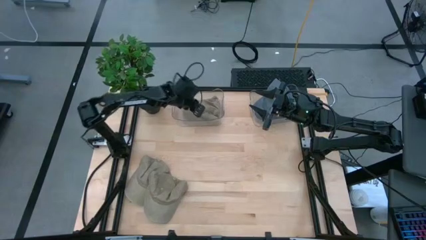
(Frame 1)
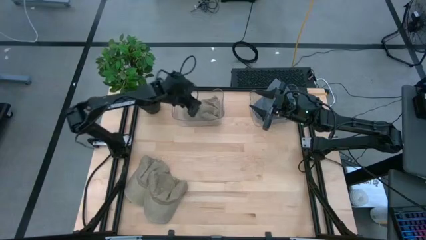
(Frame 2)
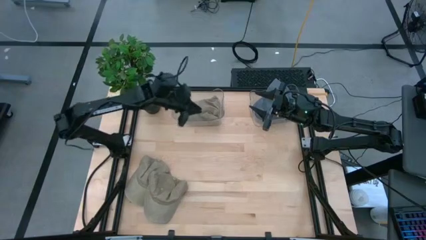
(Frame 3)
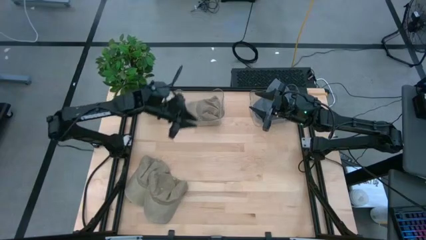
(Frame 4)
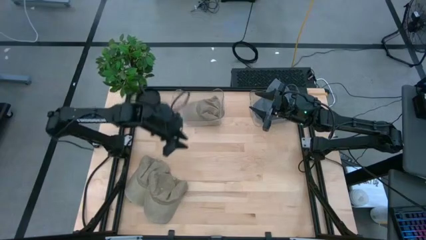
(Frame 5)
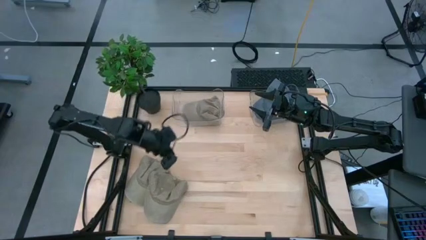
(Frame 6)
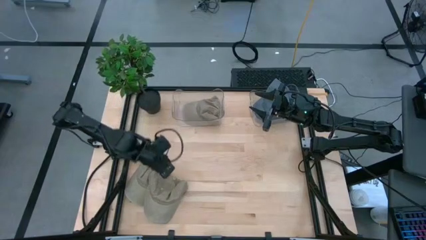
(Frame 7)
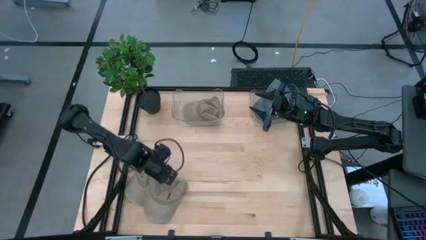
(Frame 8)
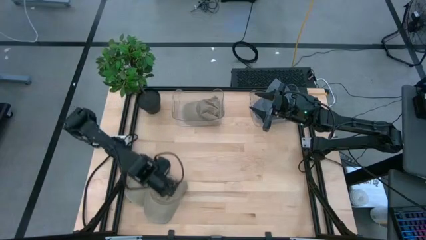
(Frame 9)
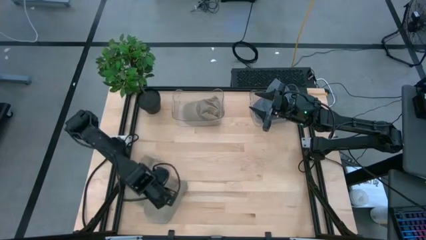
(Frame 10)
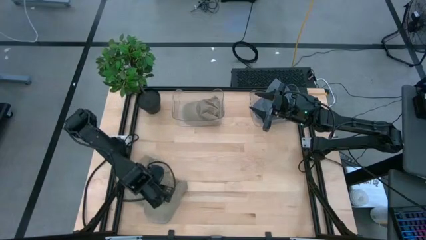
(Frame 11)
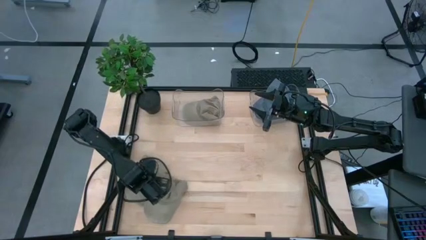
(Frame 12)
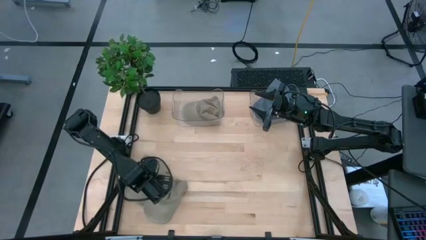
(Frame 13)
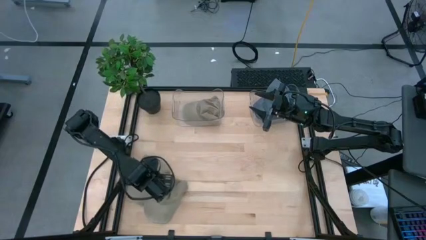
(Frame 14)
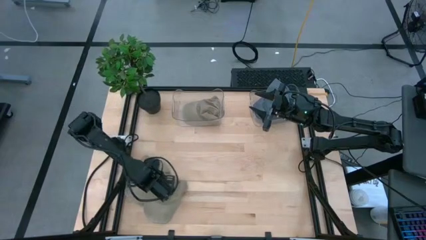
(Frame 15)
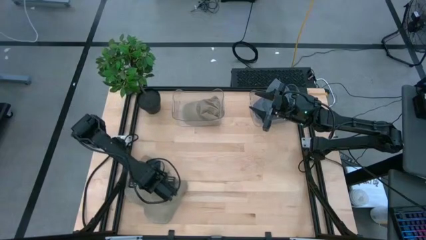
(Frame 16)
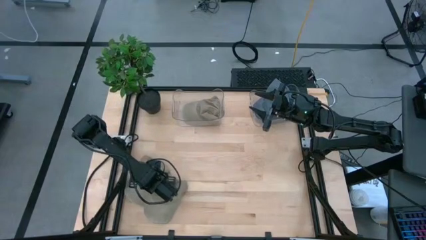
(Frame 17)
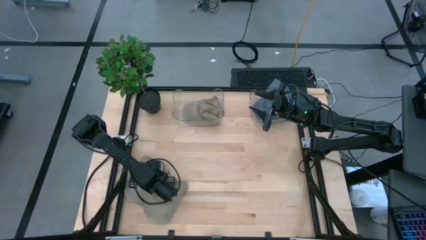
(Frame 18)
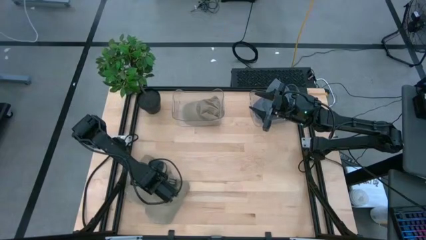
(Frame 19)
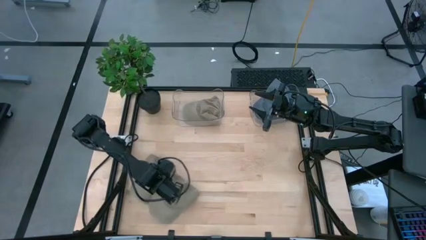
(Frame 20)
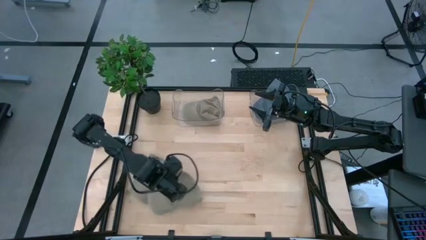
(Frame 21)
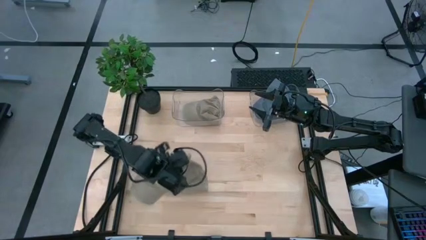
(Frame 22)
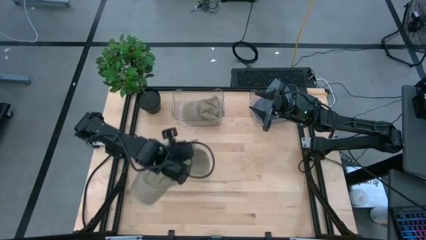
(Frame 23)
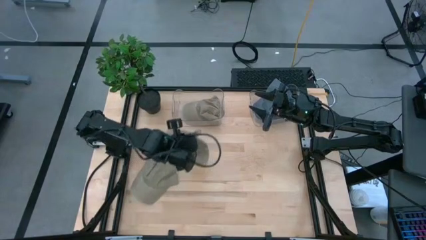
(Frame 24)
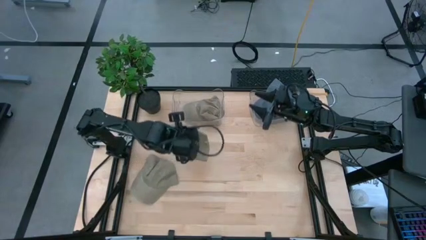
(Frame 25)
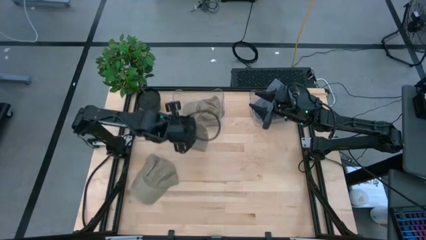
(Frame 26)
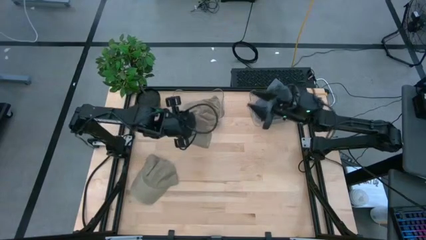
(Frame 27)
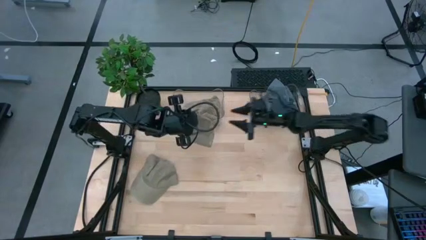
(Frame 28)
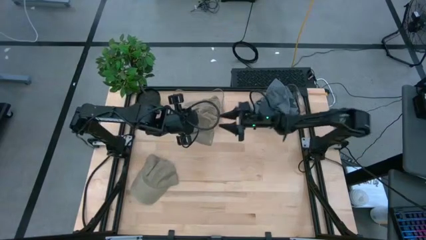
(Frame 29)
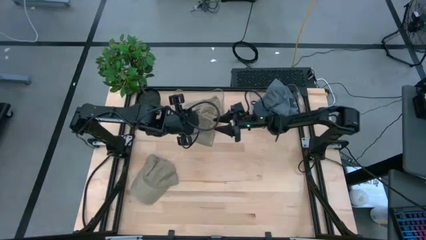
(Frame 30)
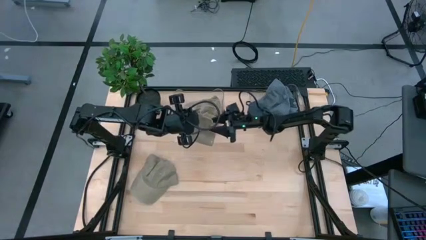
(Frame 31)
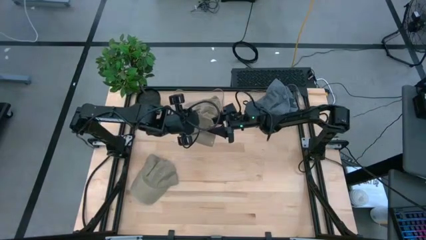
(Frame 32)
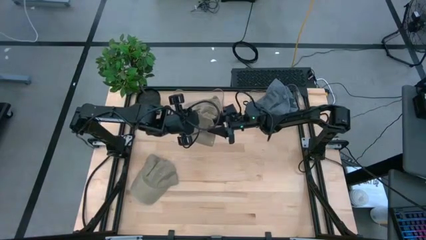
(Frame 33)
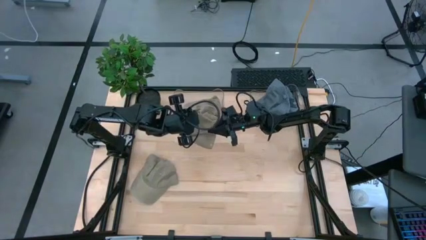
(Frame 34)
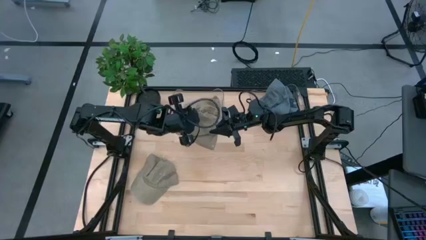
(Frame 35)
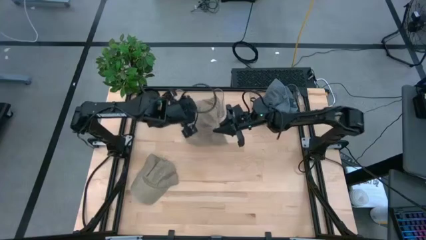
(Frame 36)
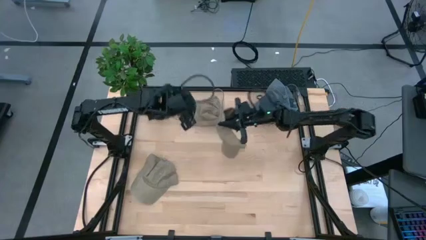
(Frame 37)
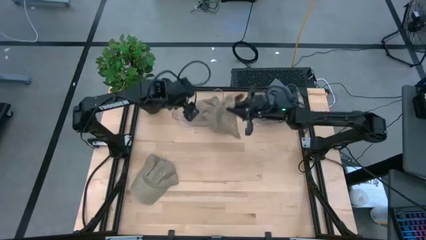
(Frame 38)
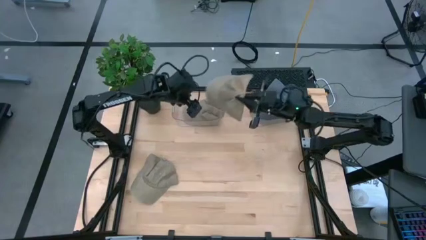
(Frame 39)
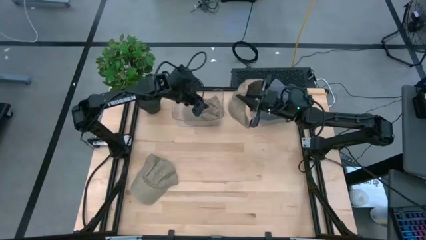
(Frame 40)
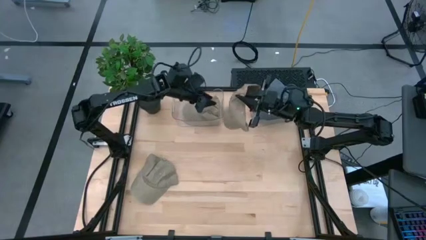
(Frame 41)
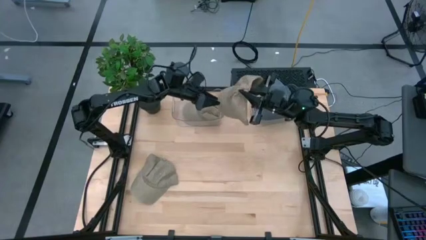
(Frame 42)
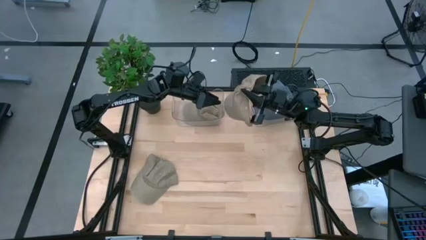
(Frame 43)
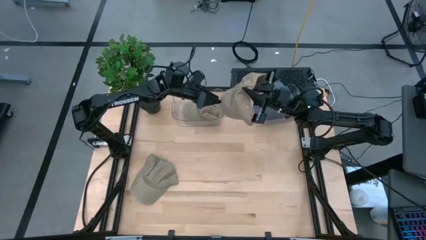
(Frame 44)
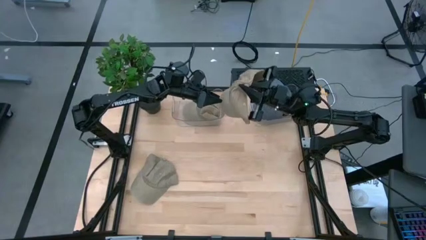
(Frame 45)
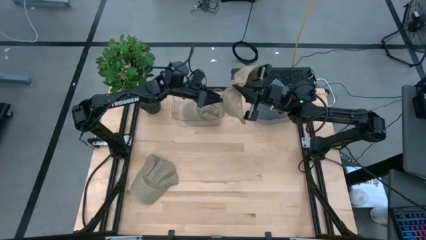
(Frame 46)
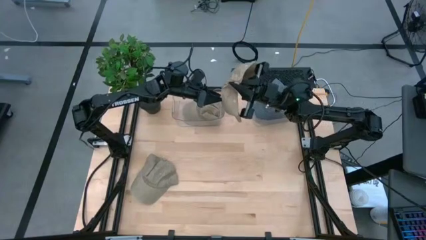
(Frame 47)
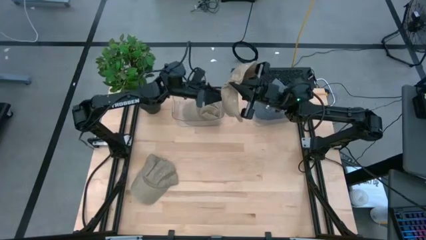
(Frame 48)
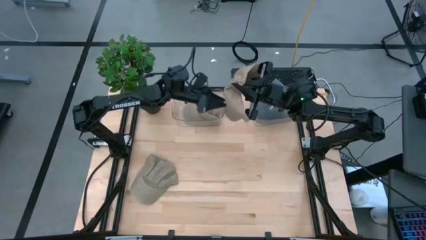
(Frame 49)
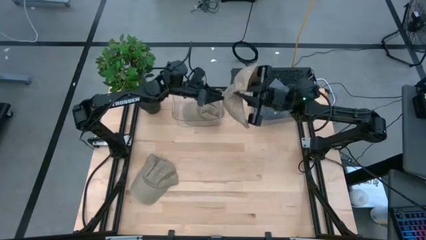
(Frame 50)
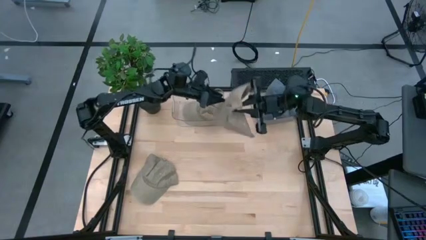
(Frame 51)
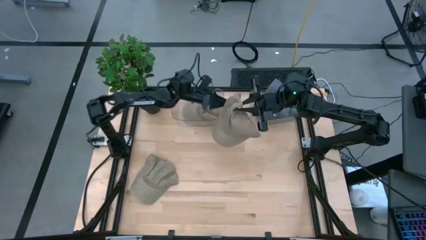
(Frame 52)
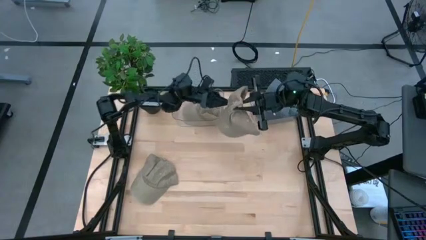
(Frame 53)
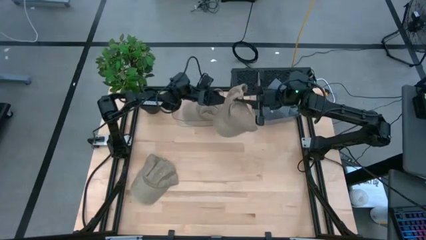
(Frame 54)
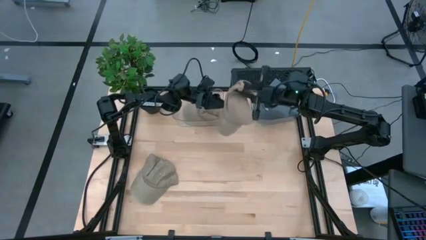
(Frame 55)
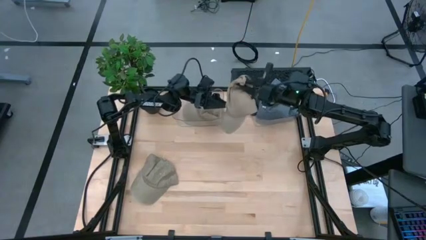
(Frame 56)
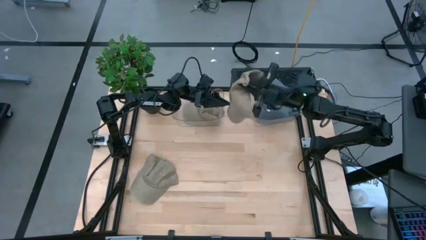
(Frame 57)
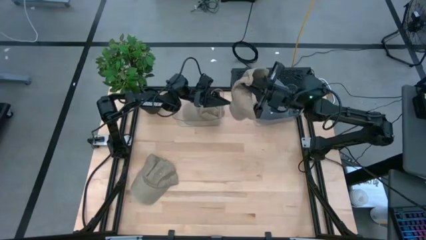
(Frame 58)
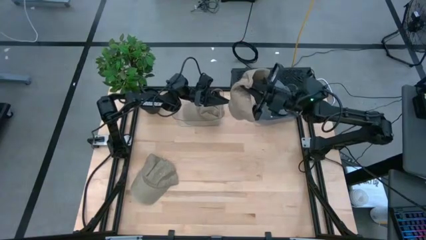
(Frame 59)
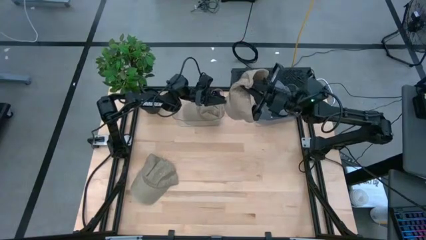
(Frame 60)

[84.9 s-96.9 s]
Task: Pick & Place hat
Put the right brown cap into the left transparent bin
